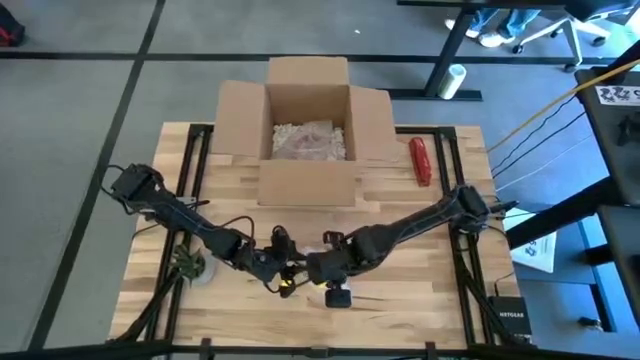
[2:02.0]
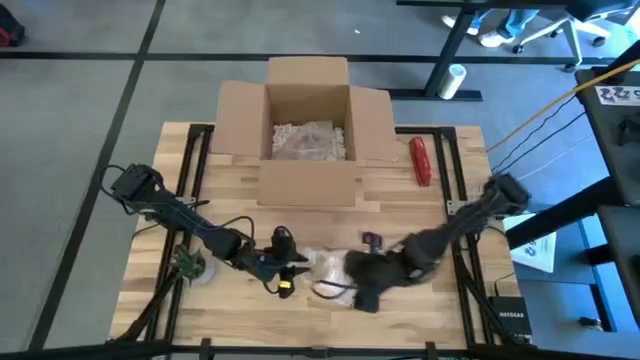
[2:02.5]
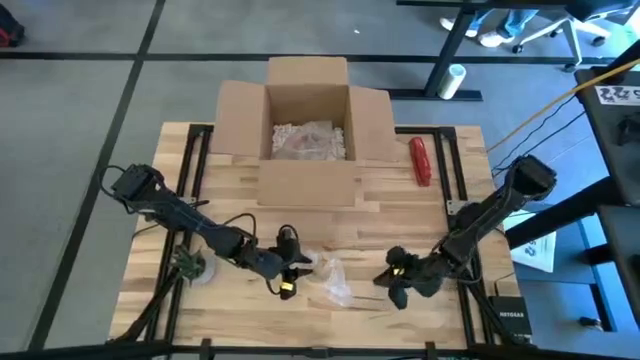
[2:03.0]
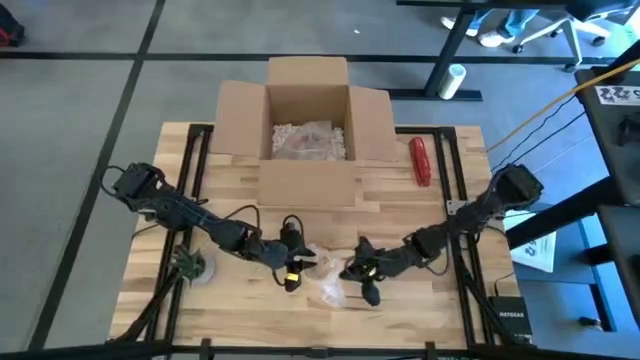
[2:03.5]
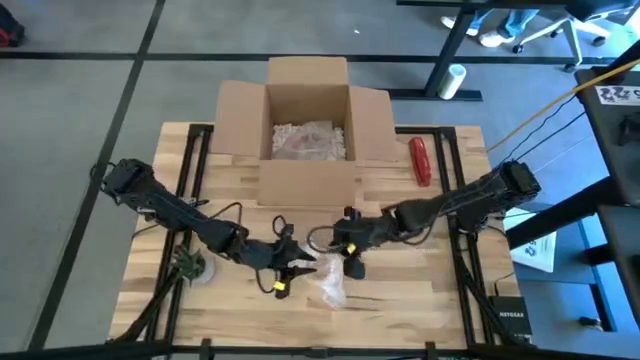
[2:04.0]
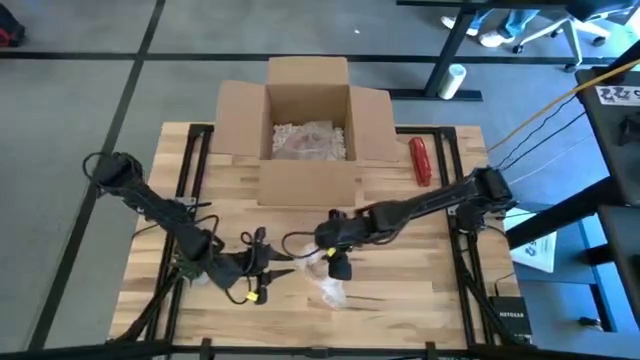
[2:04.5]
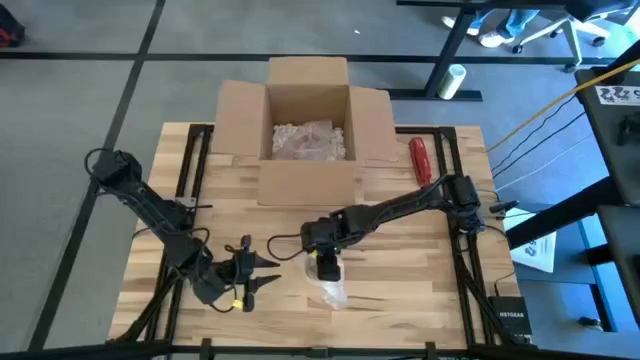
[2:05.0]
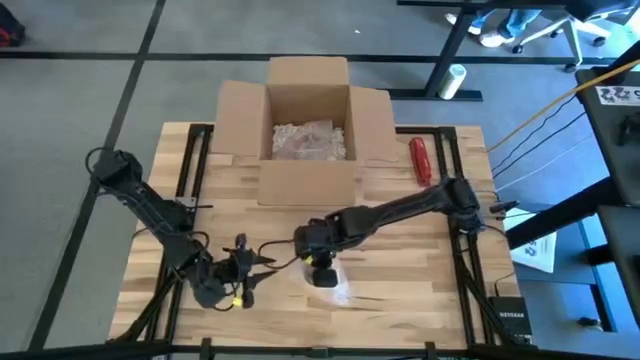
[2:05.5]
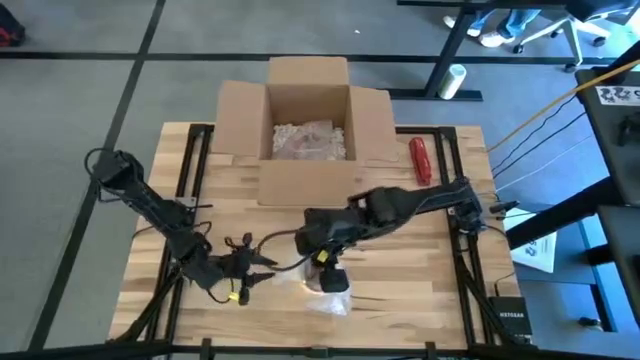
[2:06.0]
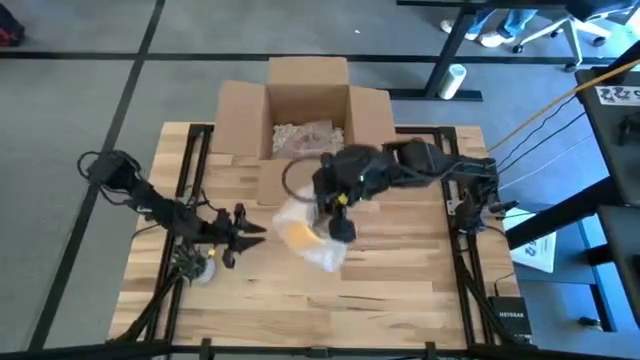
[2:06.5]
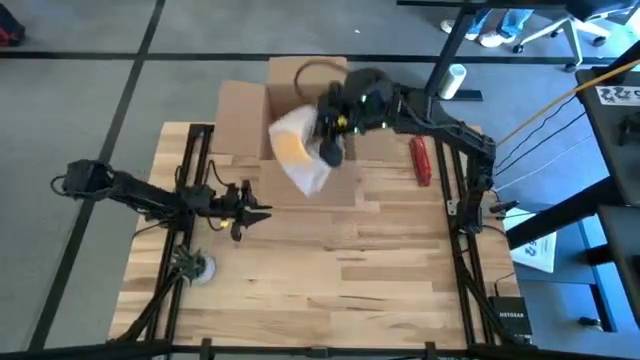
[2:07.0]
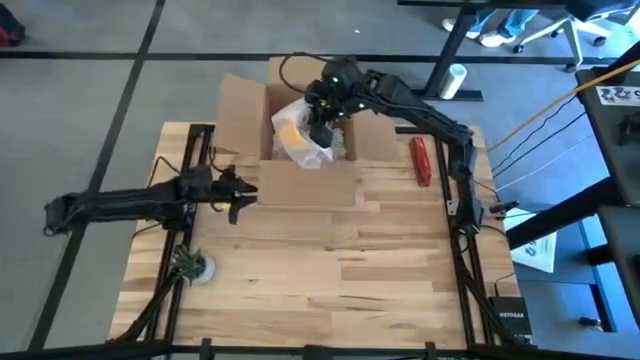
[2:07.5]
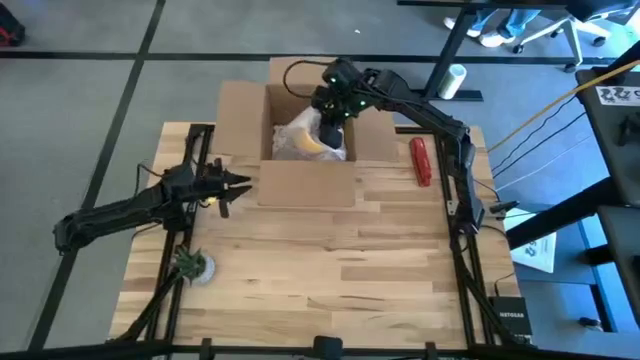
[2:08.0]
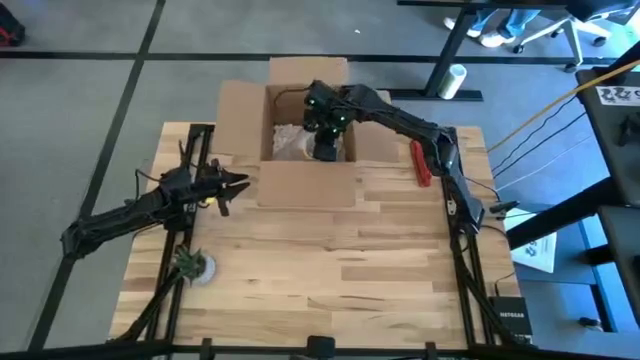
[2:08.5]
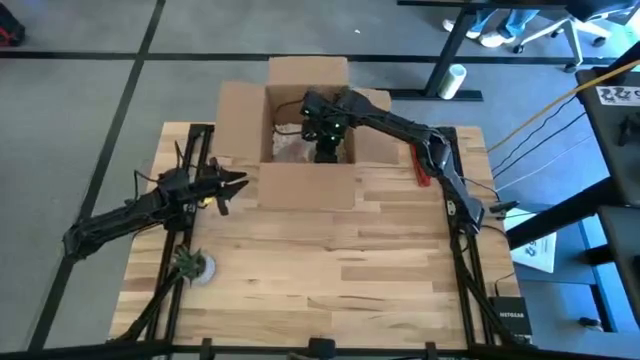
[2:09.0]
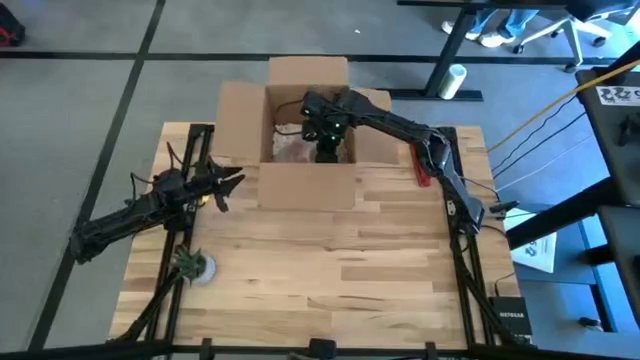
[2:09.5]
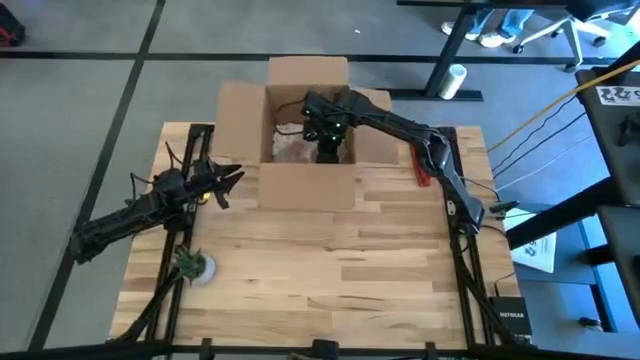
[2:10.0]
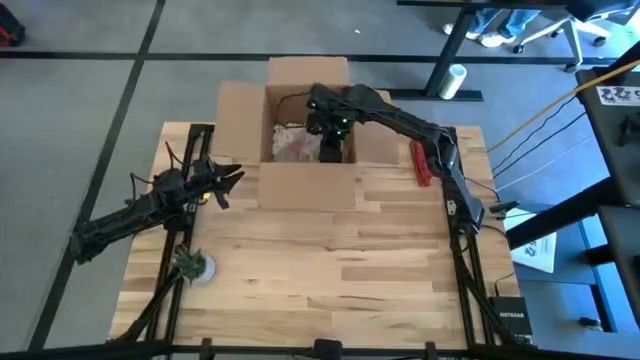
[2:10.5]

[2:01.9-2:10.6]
Task: wrap mug
Put the wrapped red mug into the cardboard box

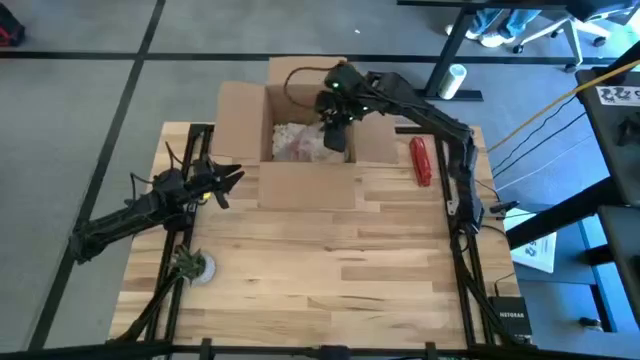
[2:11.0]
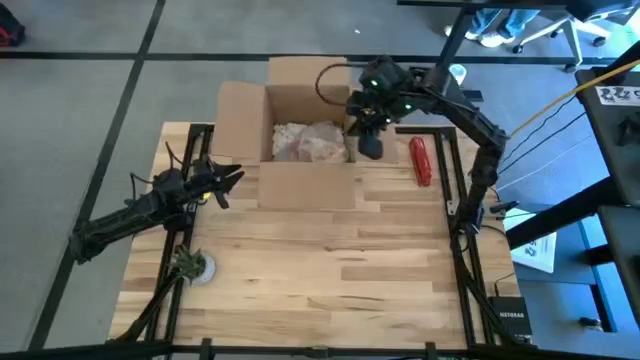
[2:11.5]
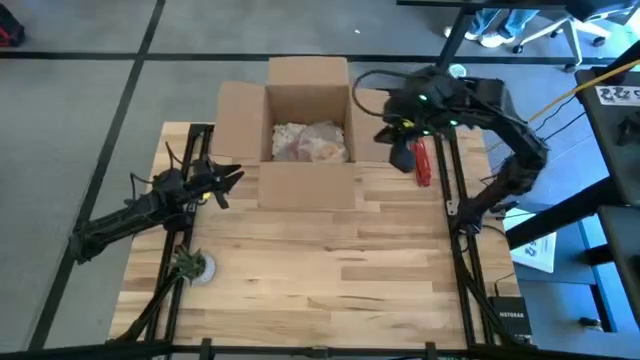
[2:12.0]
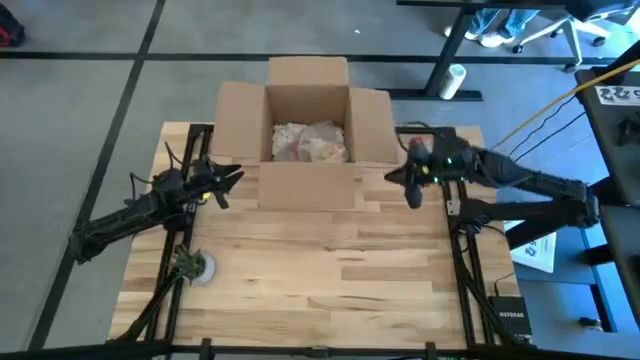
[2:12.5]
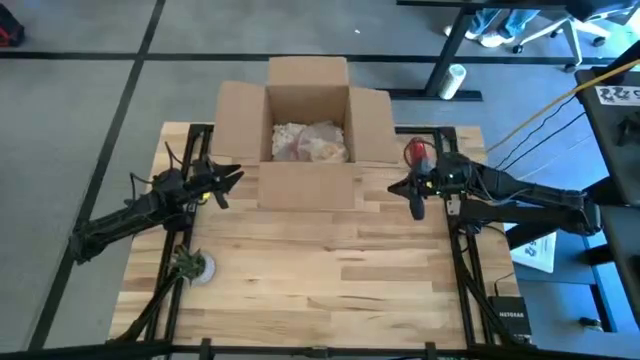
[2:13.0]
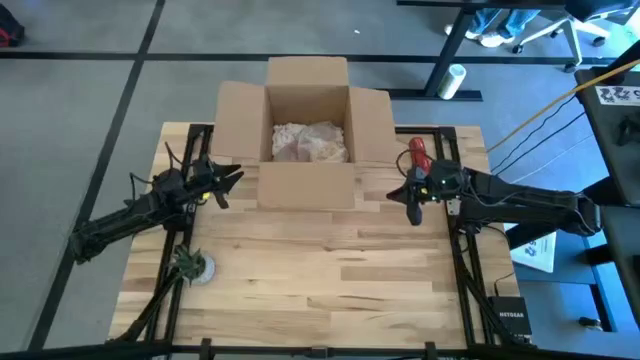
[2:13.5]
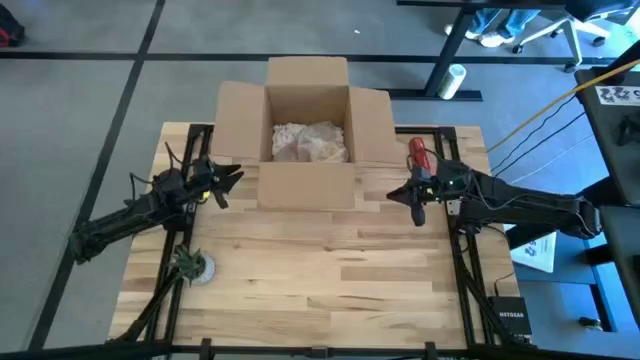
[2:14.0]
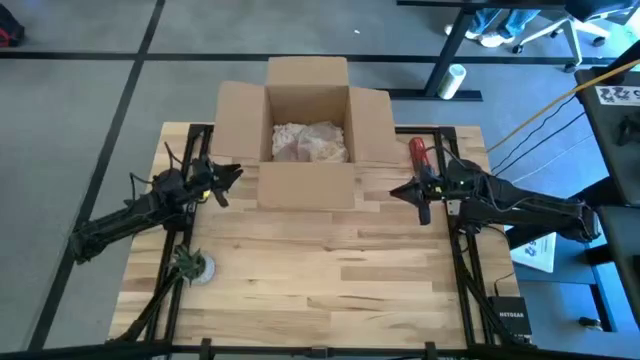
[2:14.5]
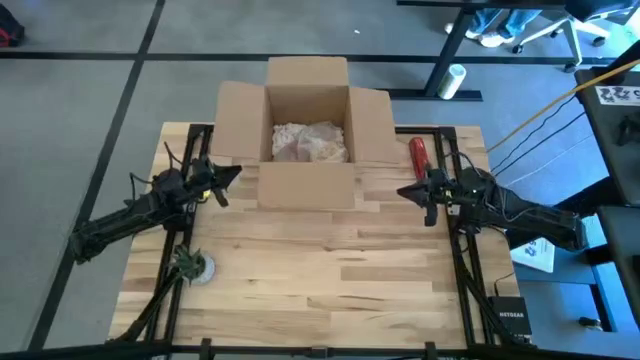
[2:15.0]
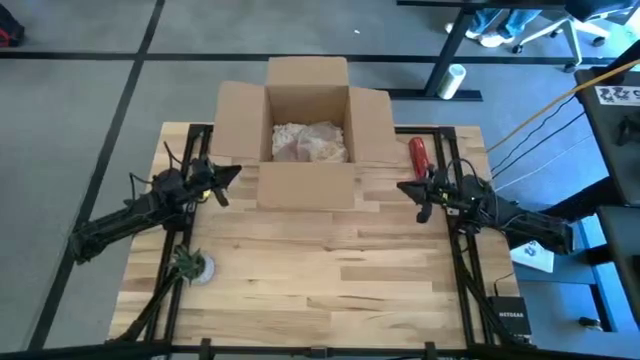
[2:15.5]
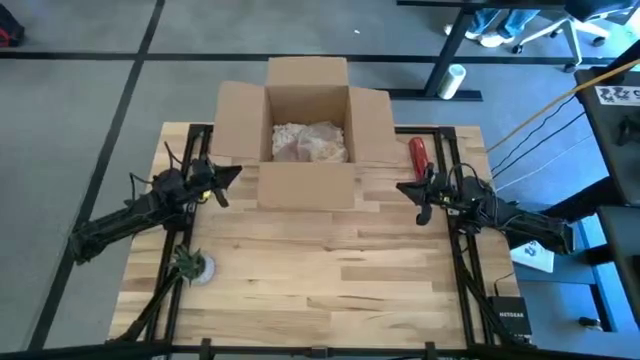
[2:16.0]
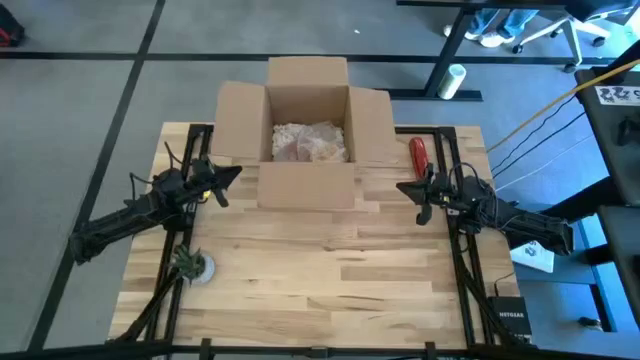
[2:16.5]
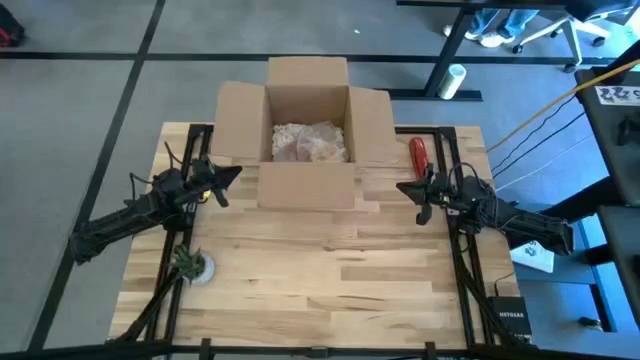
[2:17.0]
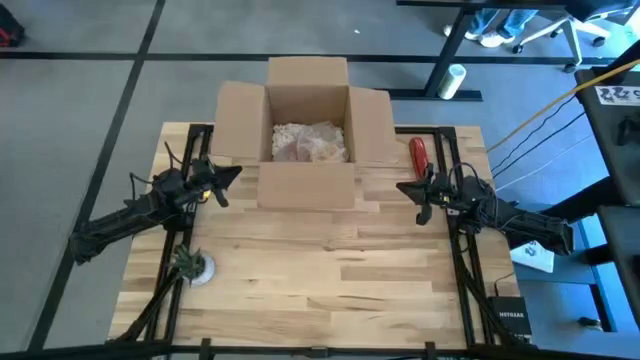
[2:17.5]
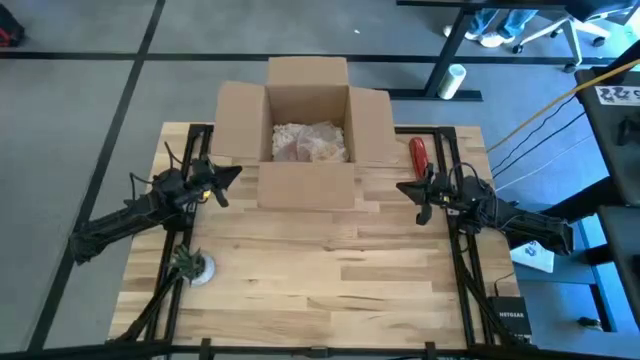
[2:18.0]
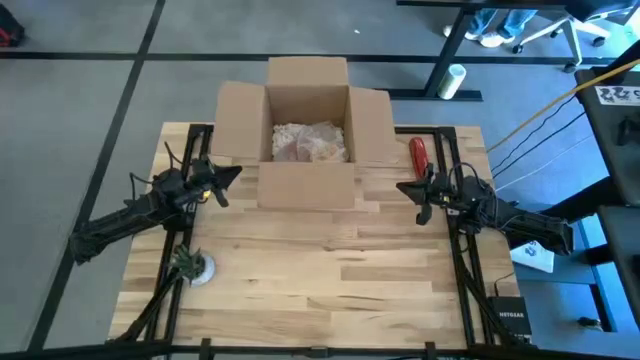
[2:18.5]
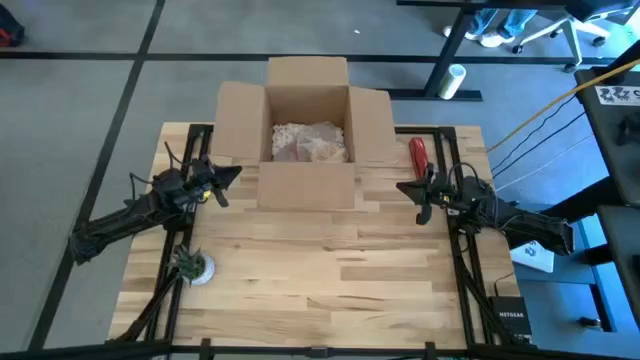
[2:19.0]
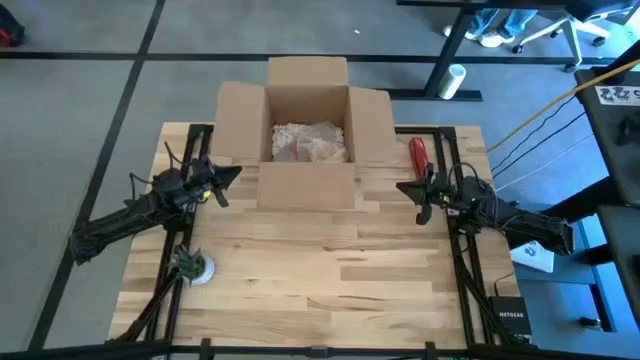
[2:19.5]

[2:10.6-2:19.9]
Return to Home Position

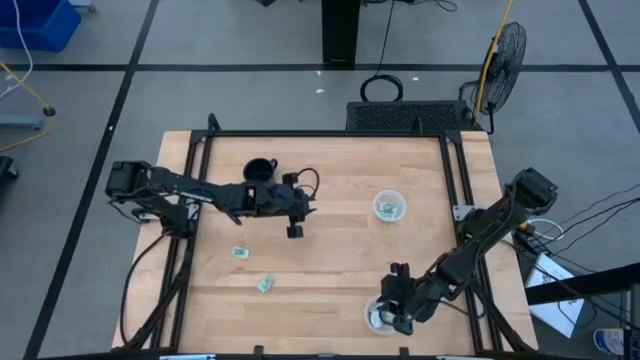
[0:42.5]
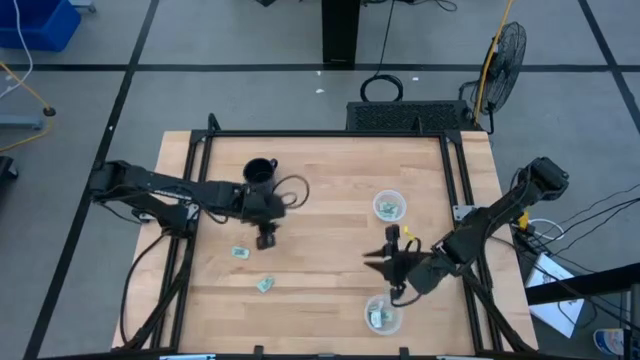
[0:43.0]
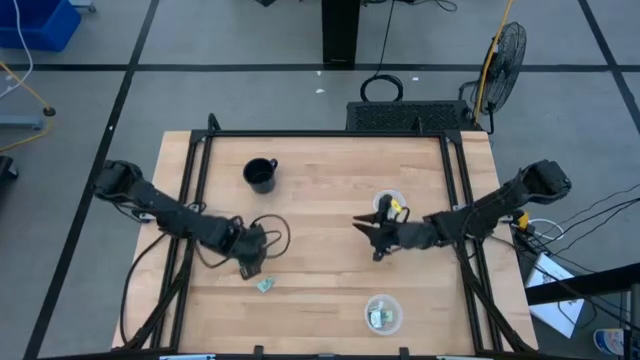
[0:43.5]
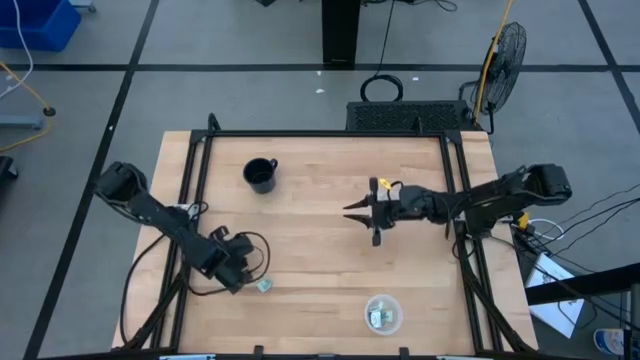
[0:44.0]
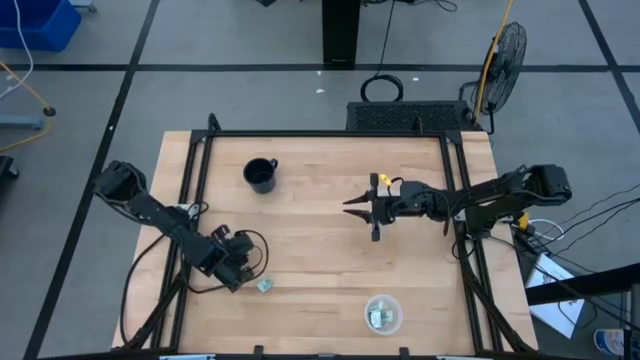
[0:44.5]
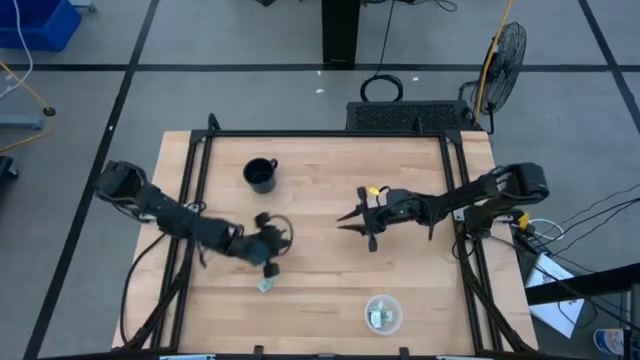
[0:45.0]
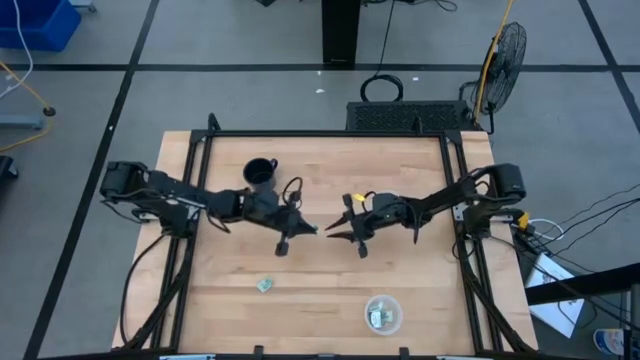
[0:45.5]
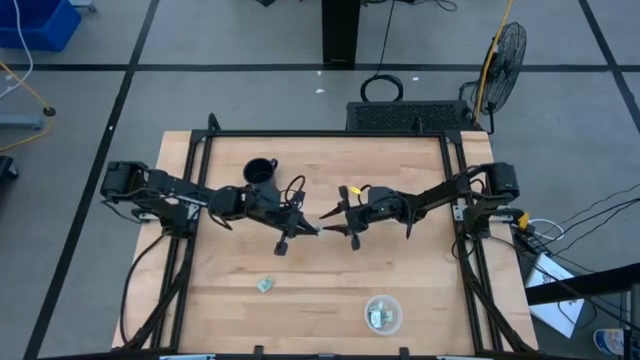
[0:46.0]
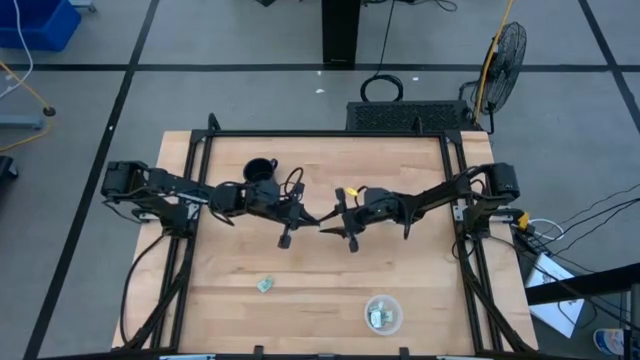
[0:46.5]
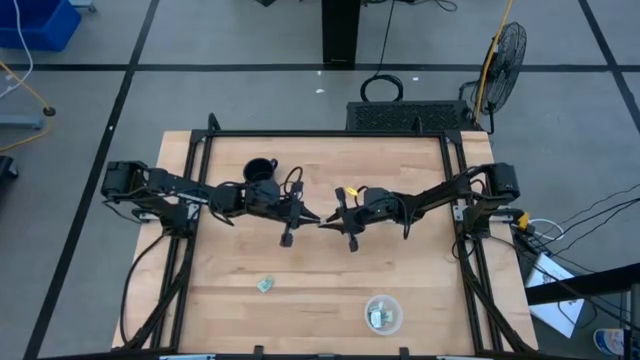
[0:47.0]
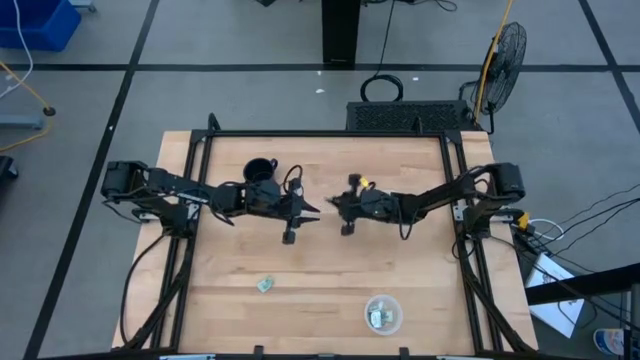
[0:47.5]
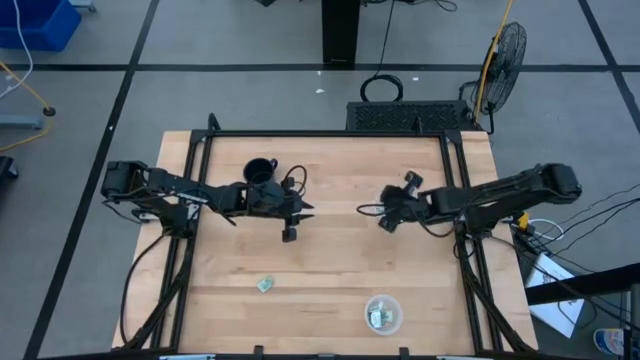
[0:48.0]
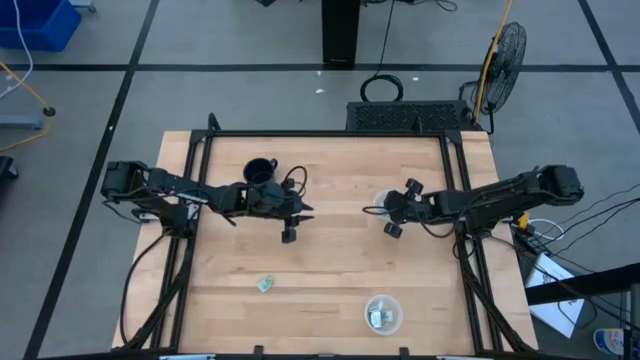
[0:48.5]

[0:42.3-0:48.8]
Task: Pick and place Stevia / Truvia into bins
Put the light green stevia packet into the top transparent container
